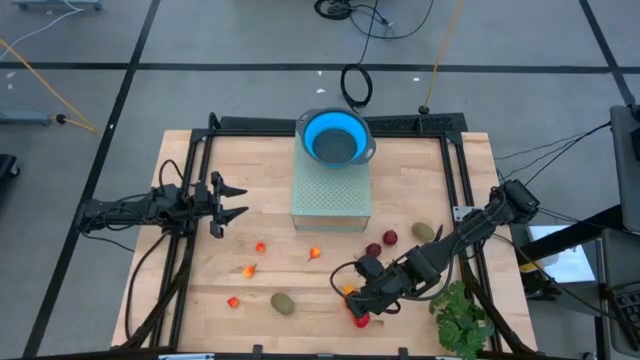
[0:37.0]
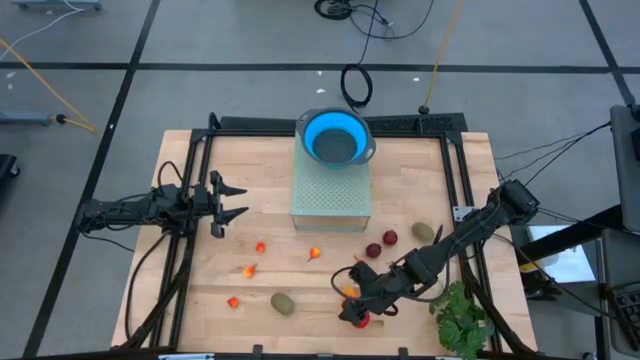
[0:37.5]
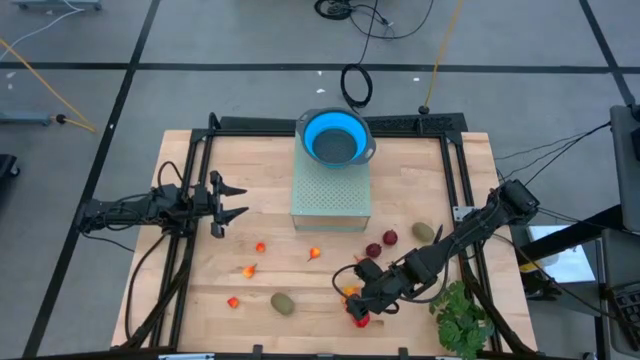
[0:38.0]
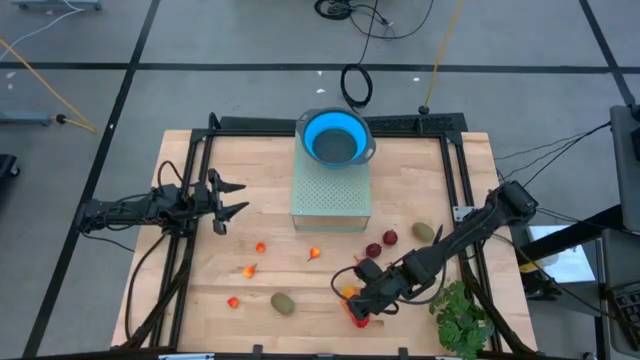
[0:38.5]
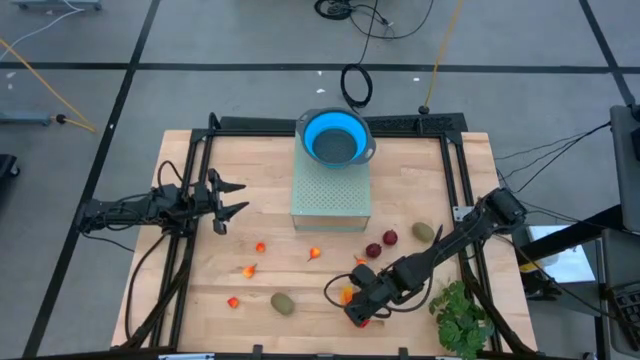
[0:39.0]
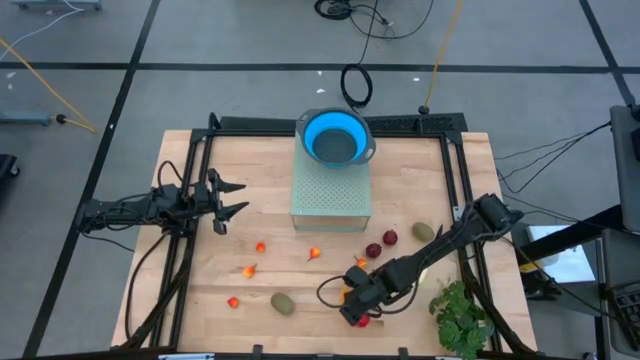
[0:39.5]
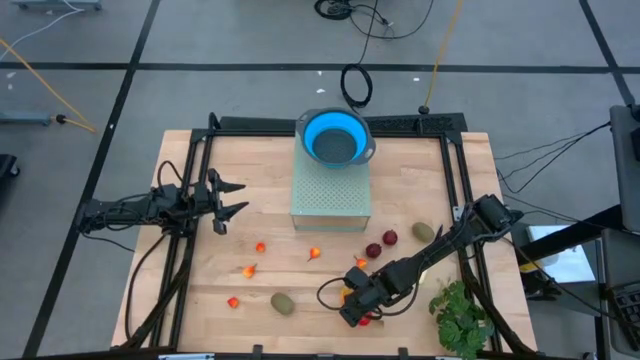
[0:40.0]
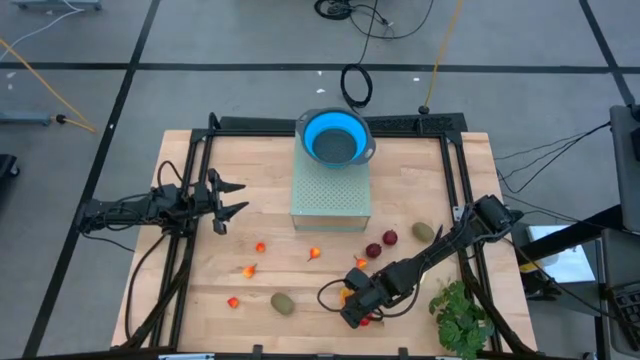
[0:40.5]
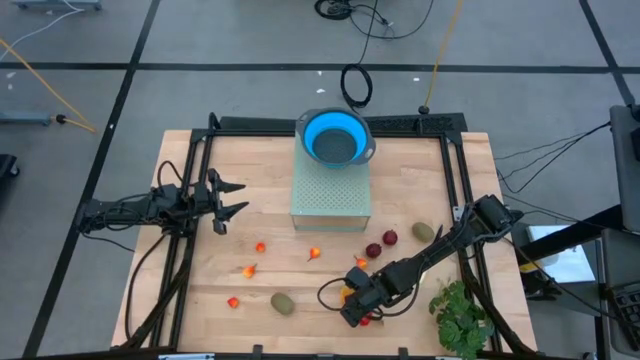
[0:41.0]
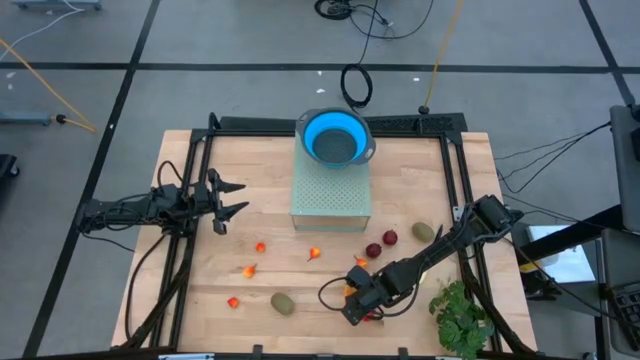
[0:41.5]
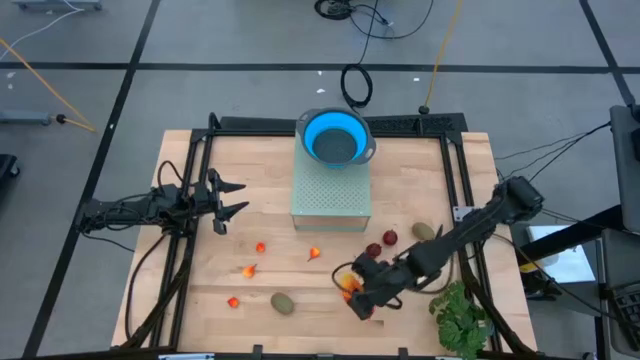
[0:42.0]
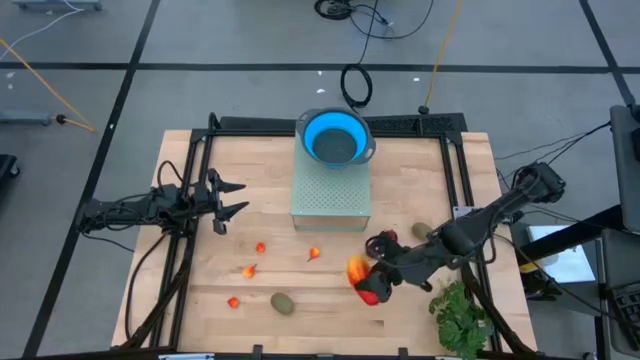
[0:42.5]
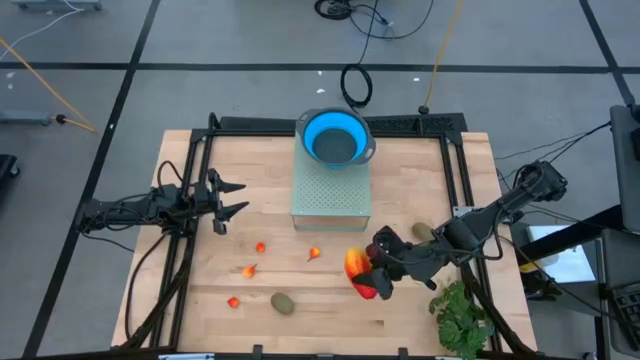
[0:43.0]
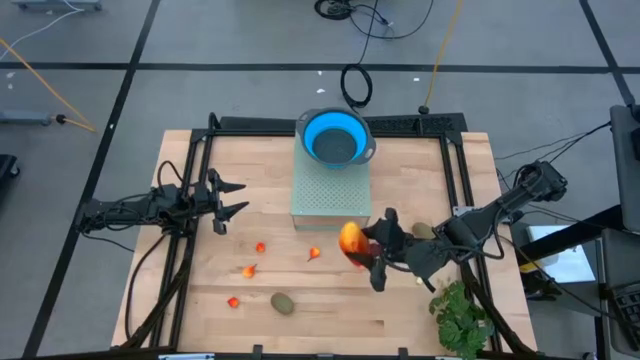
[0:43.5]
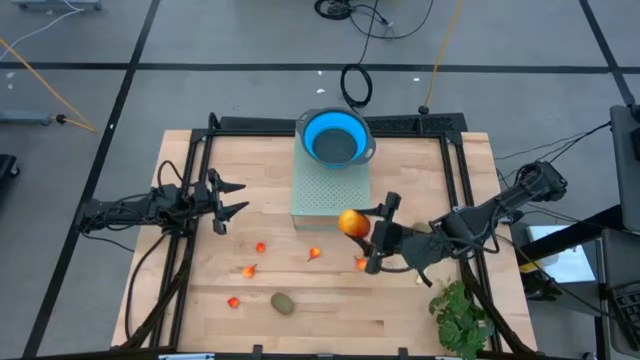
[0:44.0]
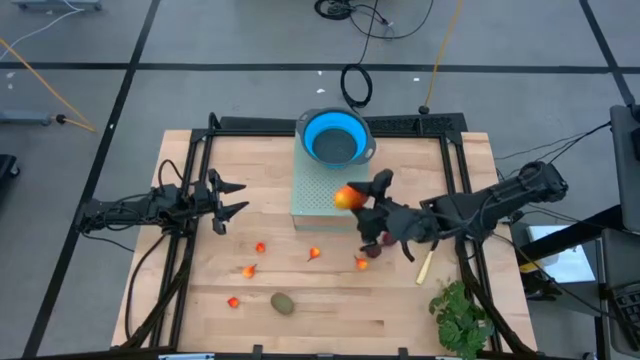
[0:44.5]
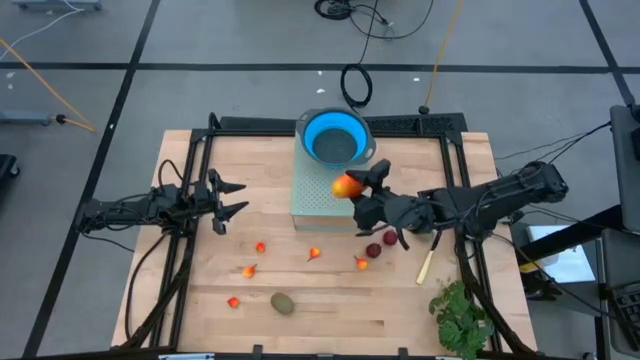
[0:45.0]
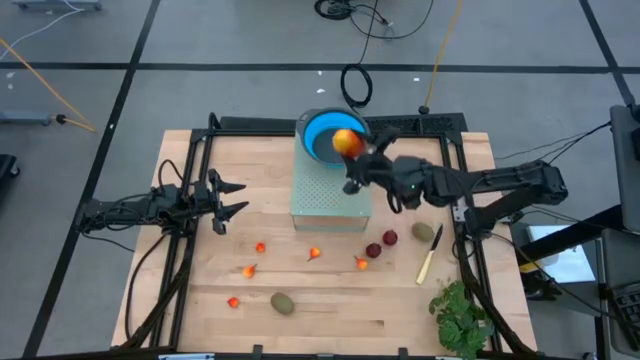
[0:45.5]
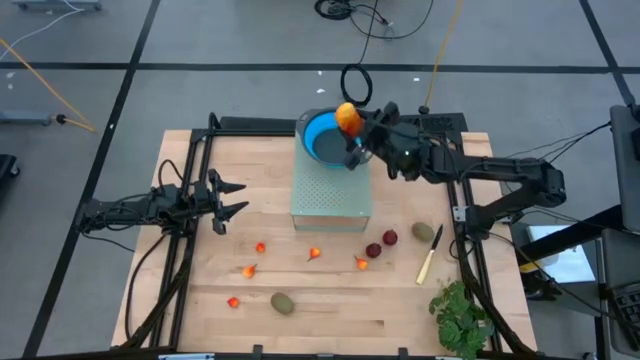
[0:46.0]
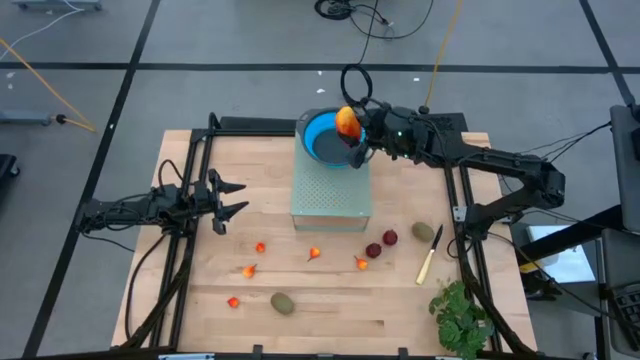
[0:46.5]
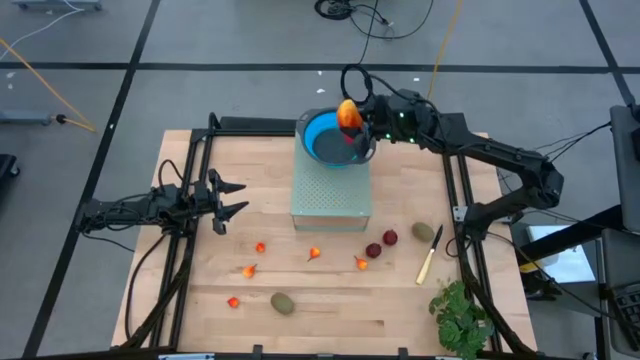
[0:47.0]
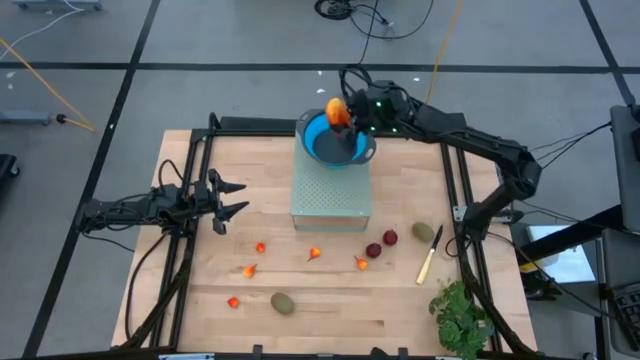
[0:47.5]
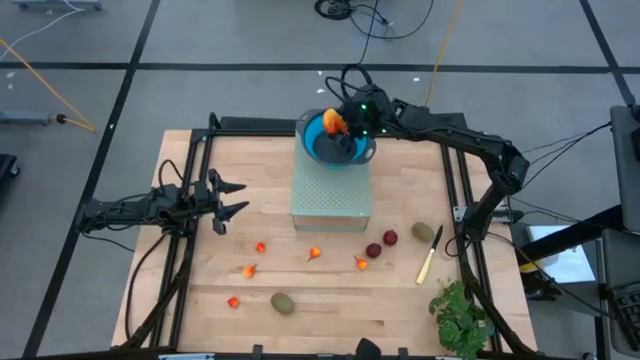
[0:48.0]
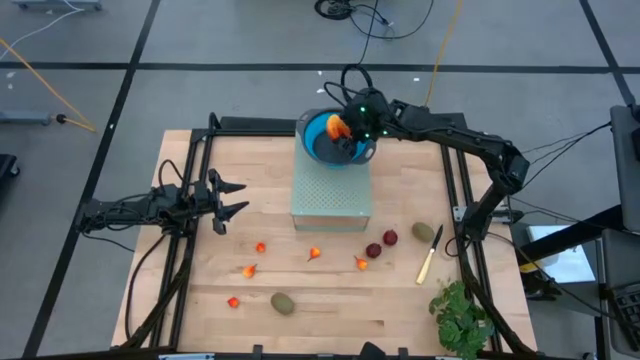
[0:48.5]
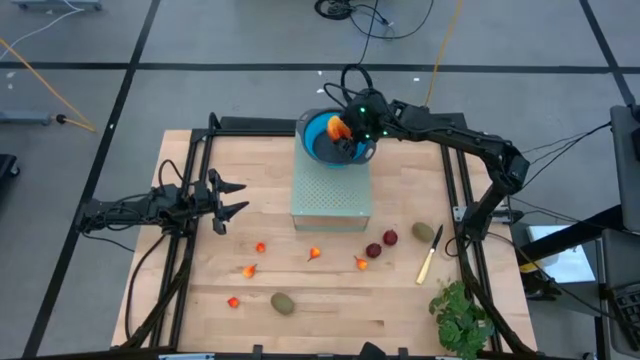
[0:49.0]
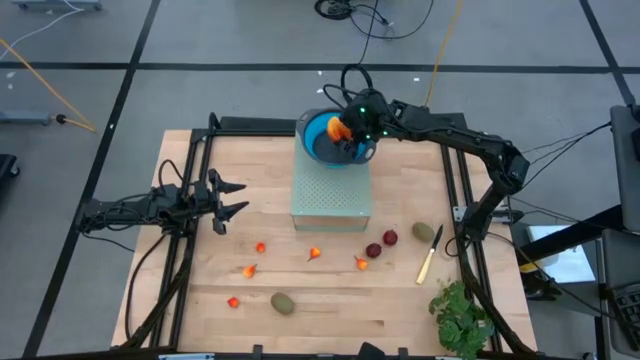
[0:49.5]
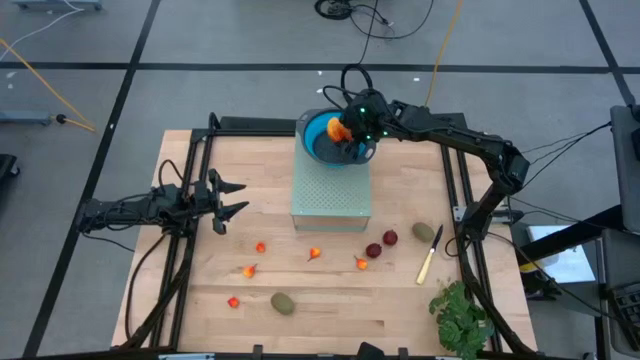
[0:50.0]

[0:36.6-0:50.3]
Task: Pick & Place Fruit
Put the mango into the blue strainer bowl on the shelf

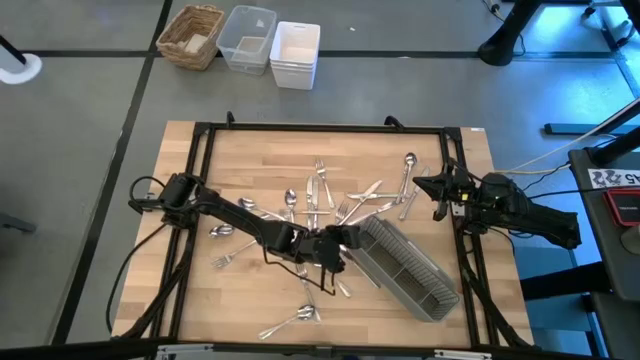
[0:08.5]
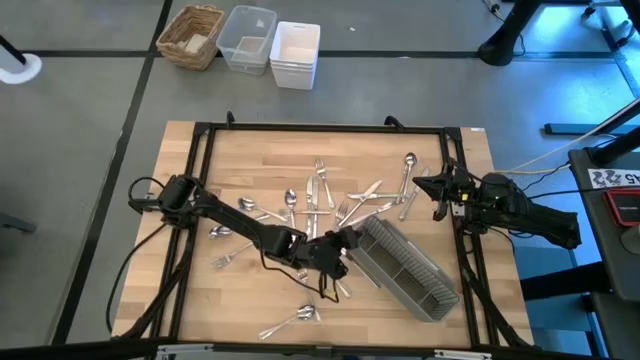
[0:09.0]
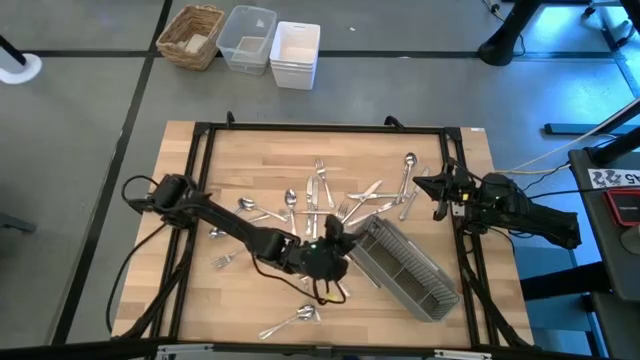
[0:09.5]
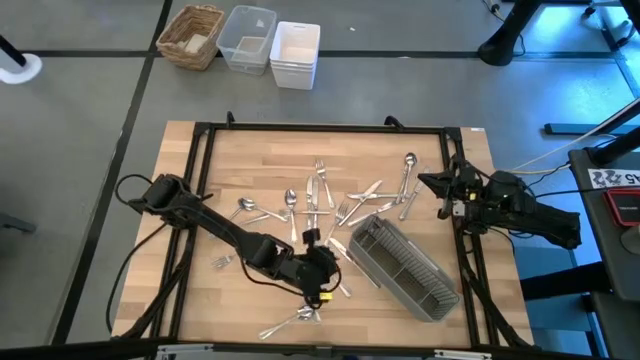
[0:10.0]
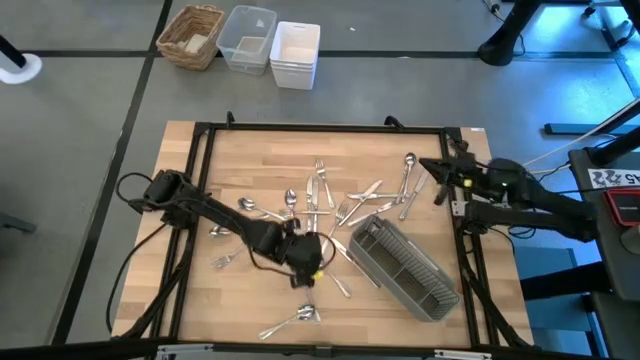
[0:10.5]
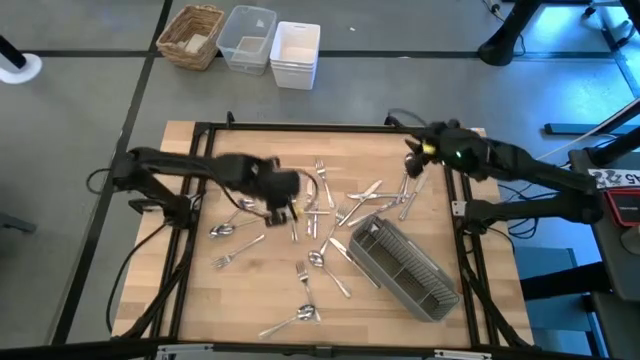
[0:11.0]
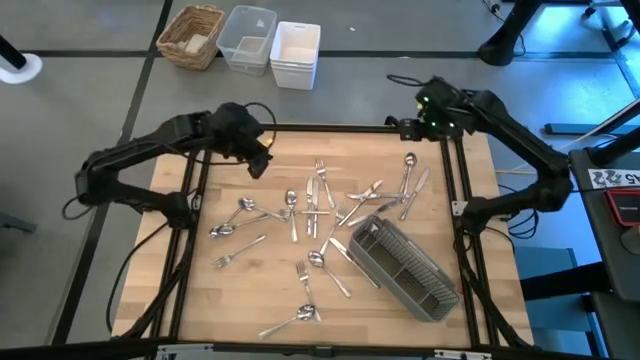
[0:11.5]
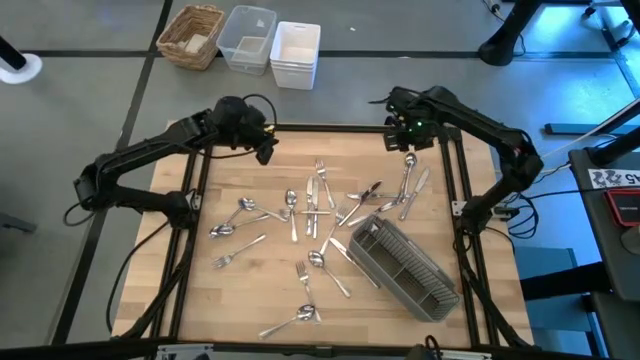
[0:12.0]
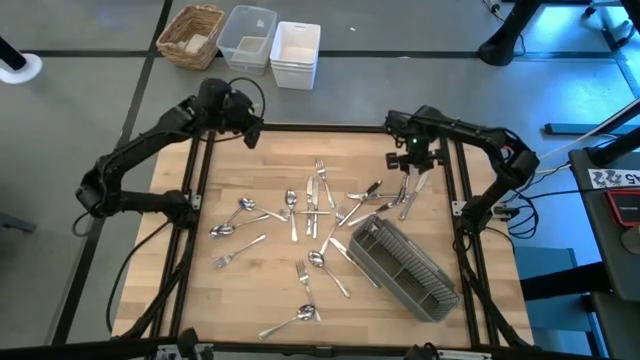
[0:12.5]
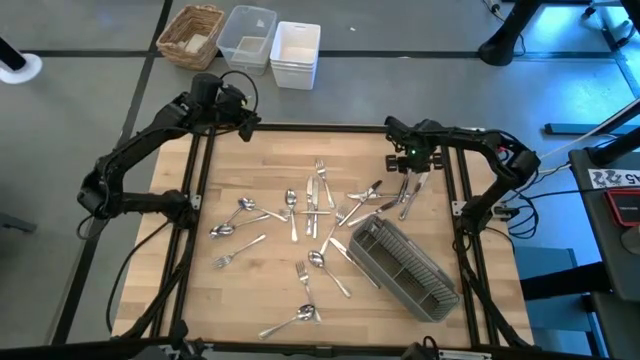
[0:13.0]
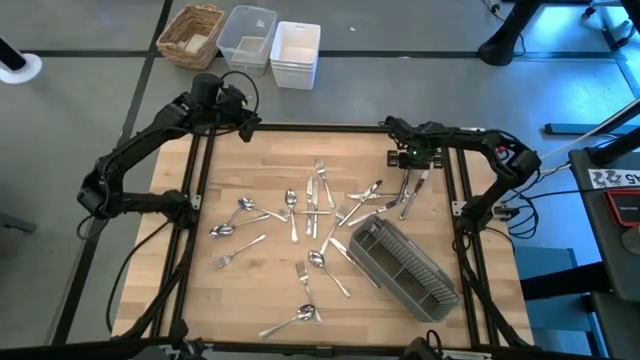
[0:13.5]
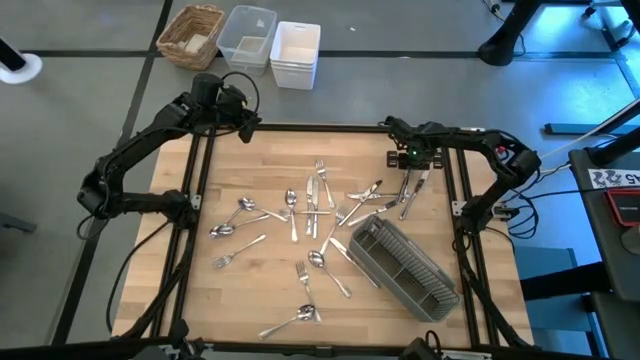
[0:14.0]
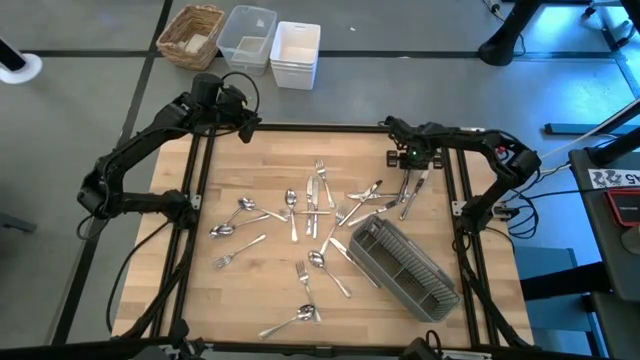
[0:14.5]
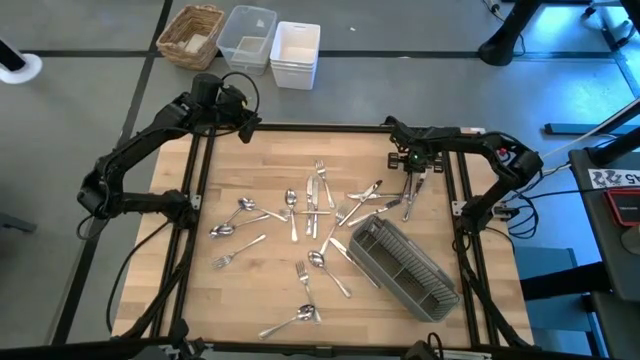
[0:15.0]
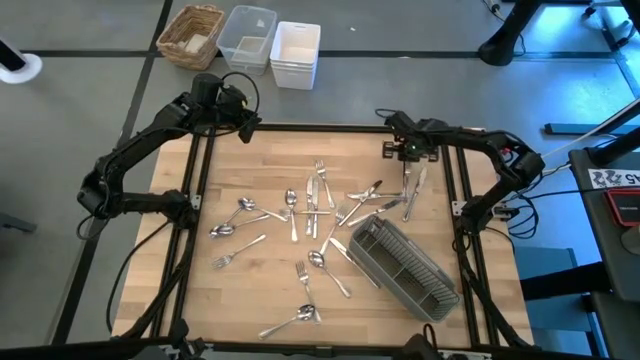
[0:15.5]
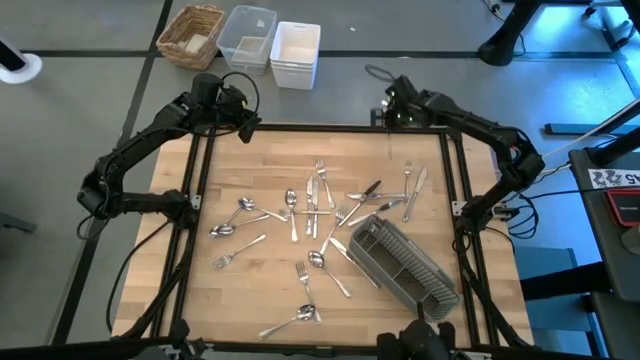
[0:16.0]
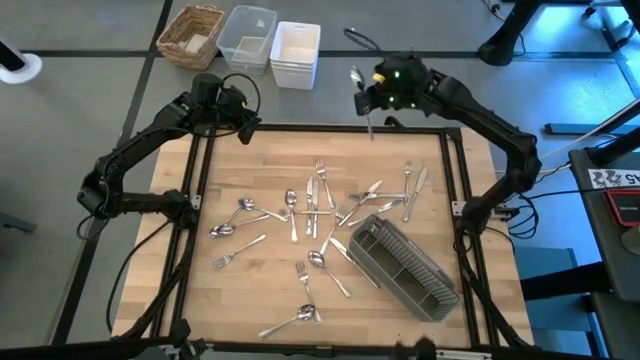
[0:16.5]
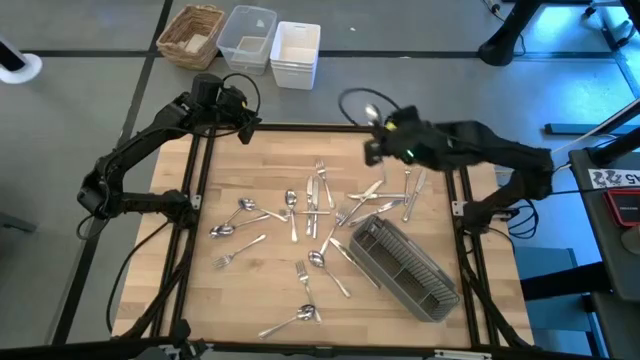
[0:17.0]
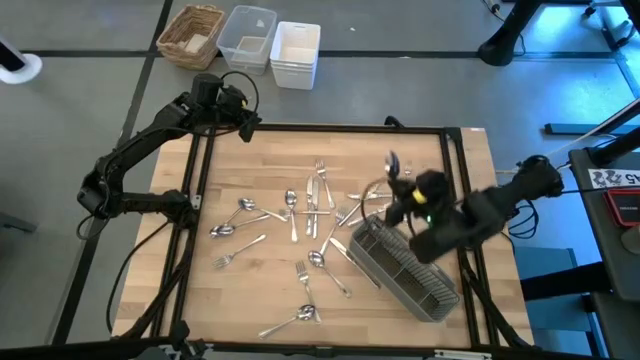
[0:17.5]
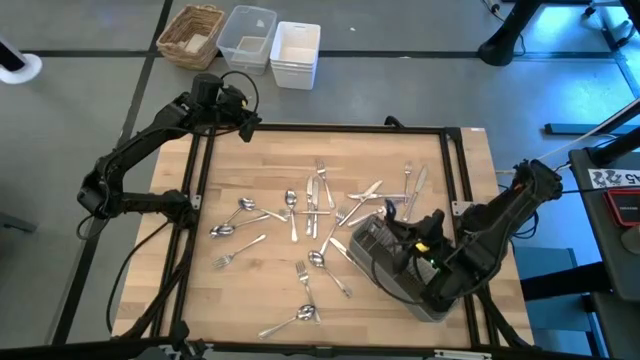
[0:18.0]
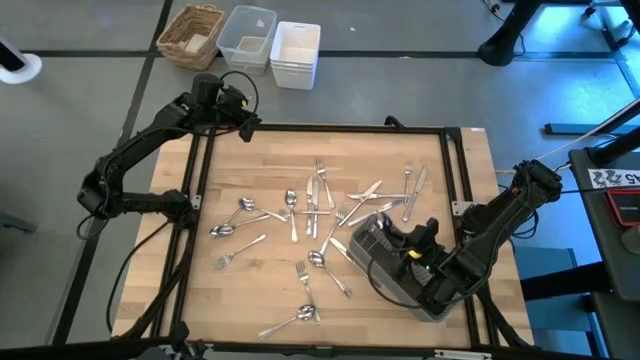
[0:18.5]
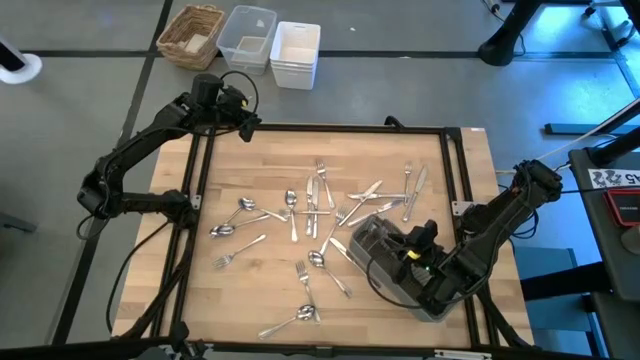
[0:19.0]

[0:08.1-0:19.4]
Task: Sort silverware
Put the silver spoon into the gray silverware basket
